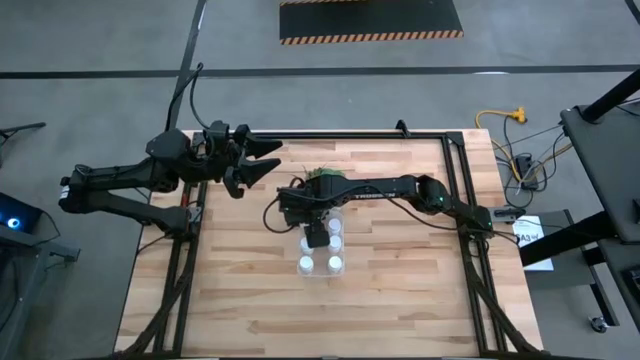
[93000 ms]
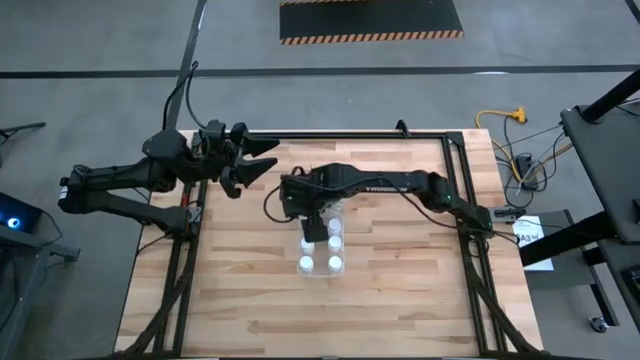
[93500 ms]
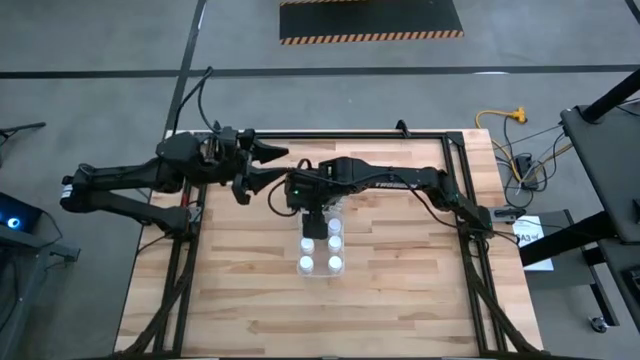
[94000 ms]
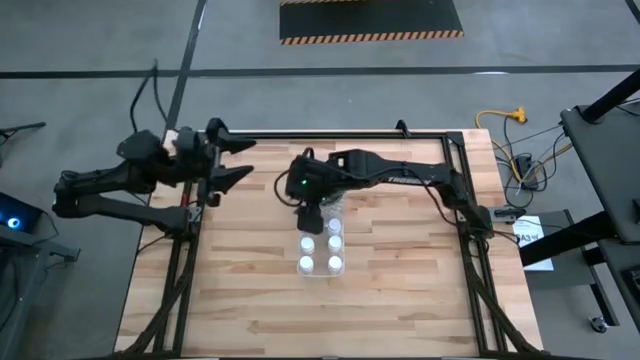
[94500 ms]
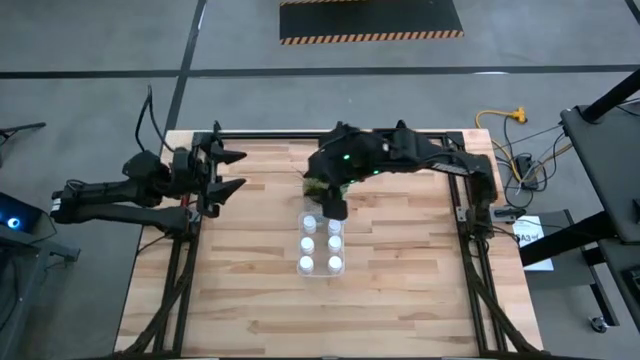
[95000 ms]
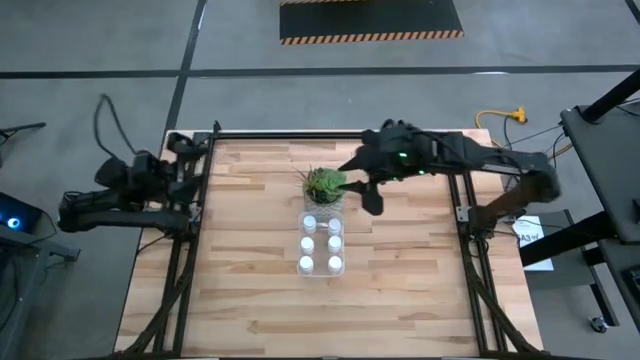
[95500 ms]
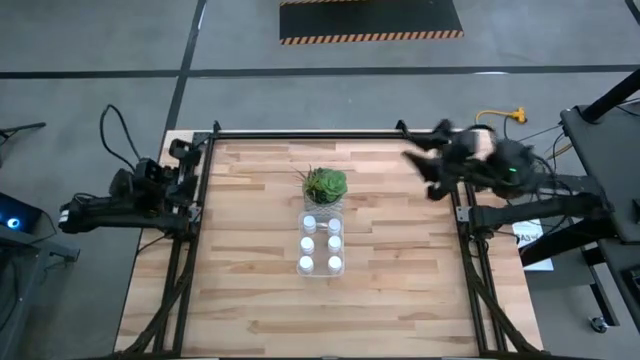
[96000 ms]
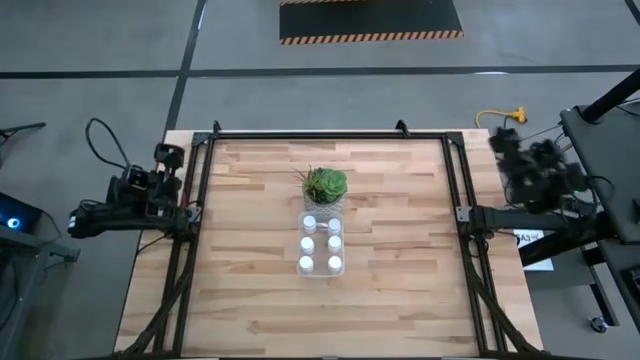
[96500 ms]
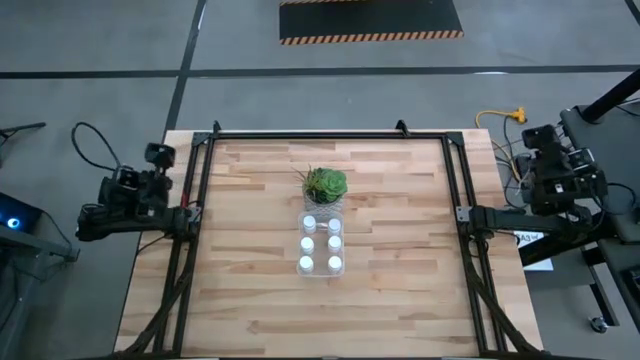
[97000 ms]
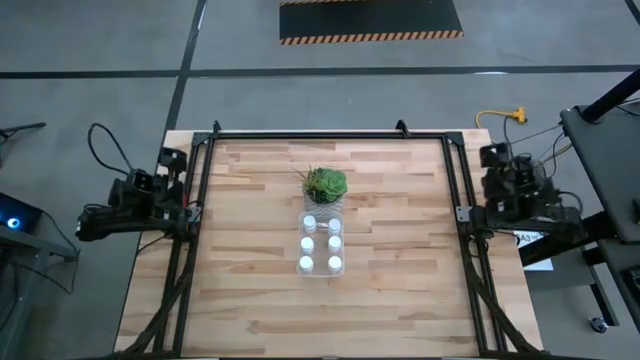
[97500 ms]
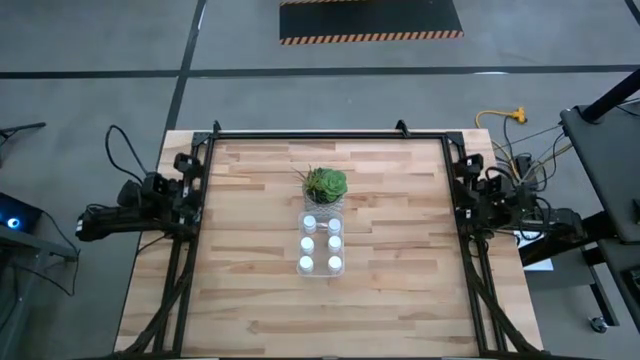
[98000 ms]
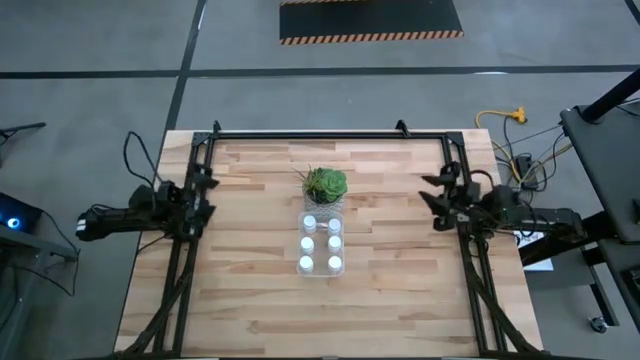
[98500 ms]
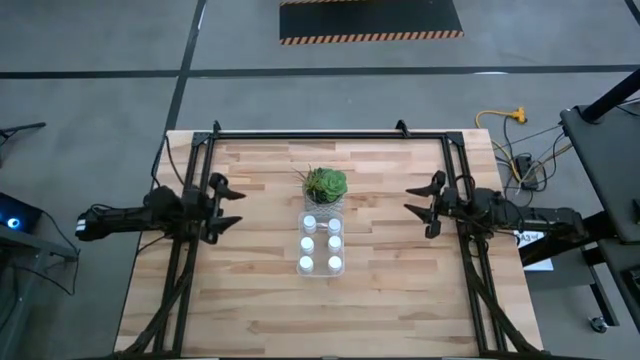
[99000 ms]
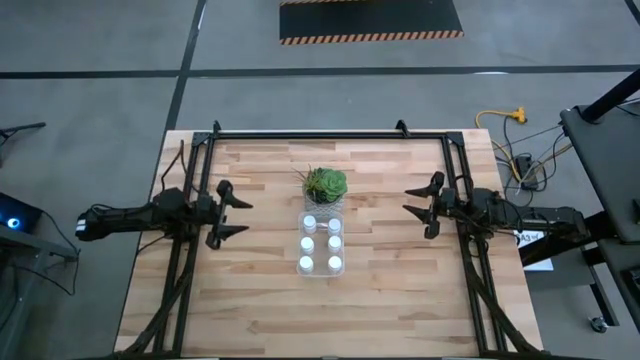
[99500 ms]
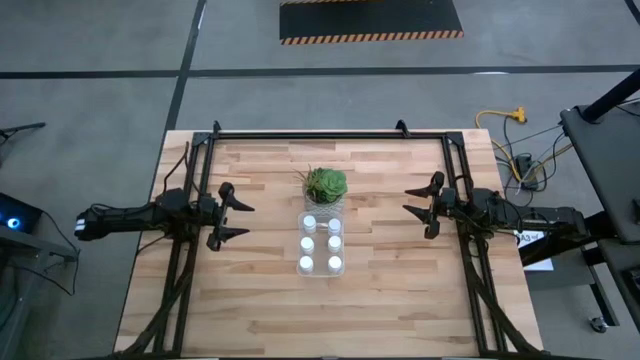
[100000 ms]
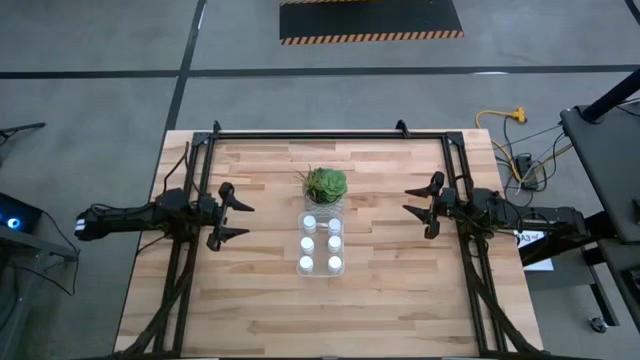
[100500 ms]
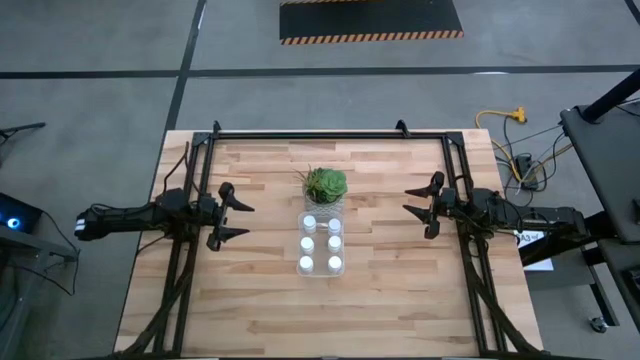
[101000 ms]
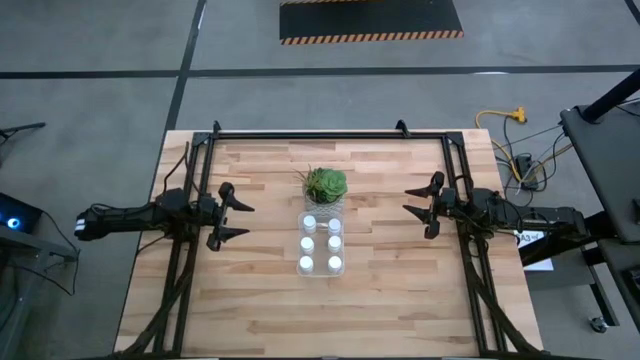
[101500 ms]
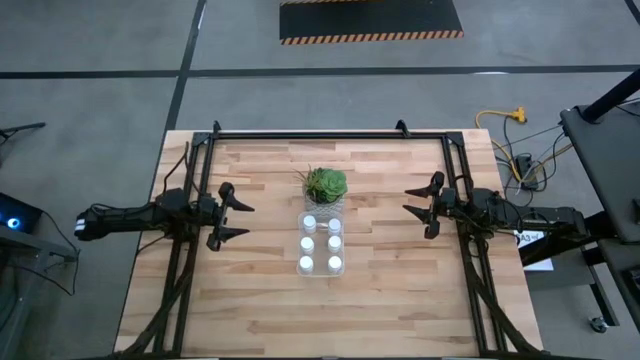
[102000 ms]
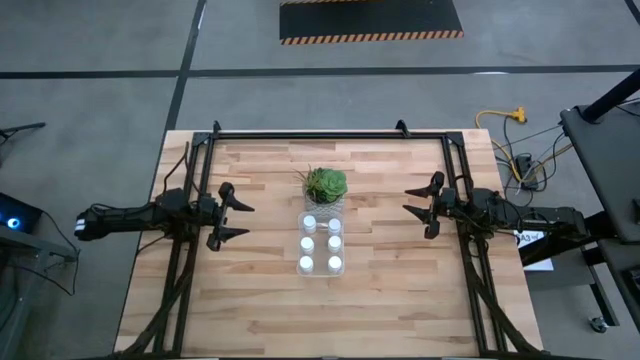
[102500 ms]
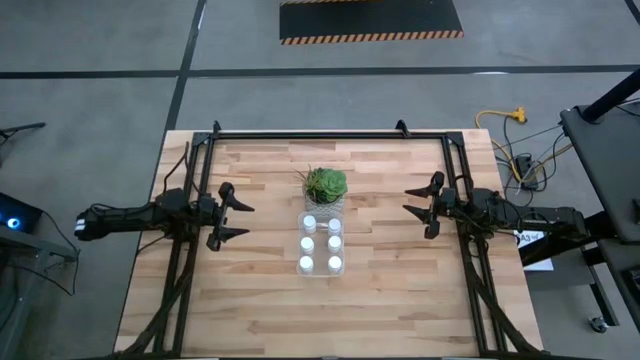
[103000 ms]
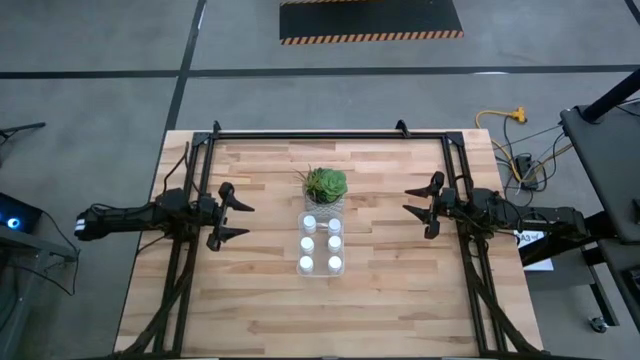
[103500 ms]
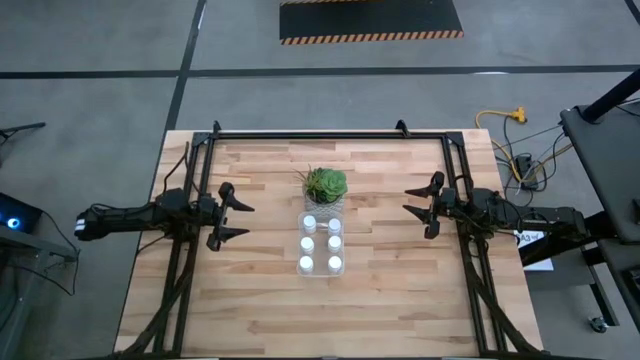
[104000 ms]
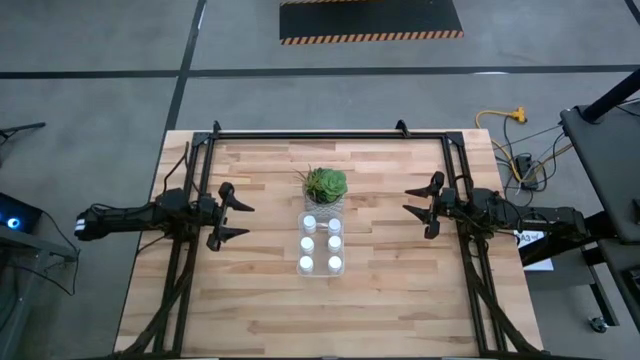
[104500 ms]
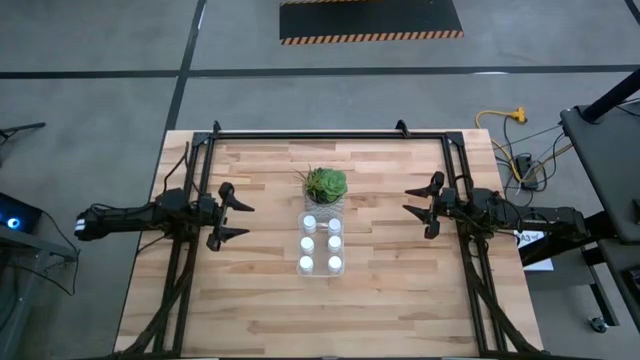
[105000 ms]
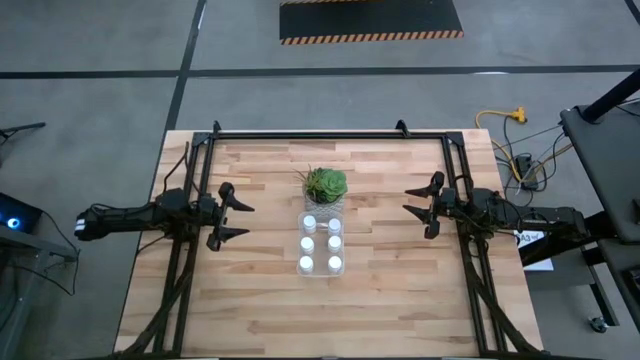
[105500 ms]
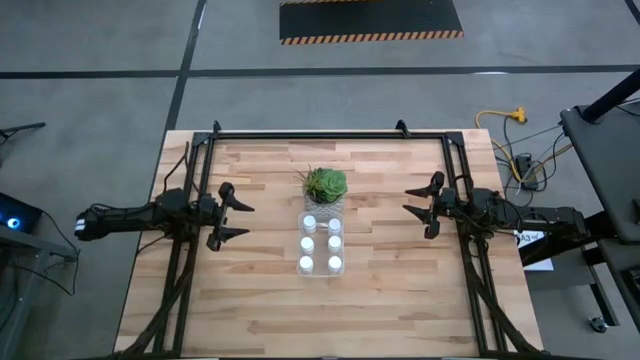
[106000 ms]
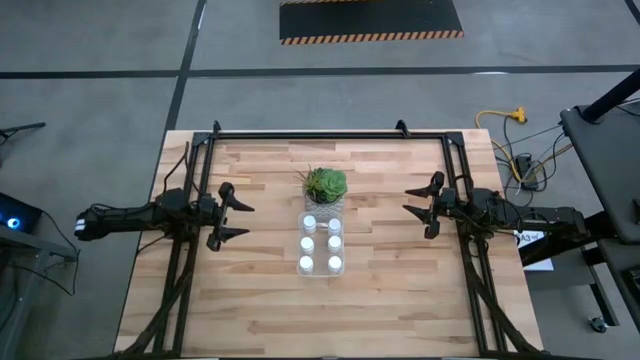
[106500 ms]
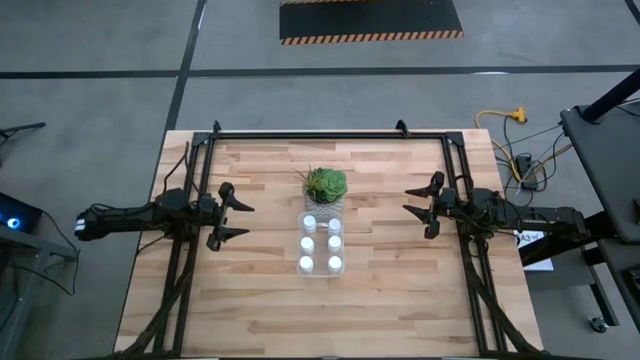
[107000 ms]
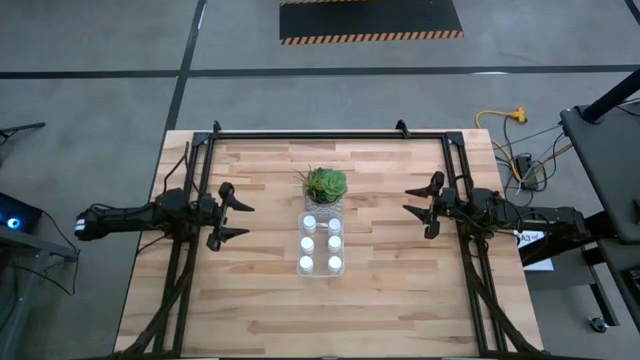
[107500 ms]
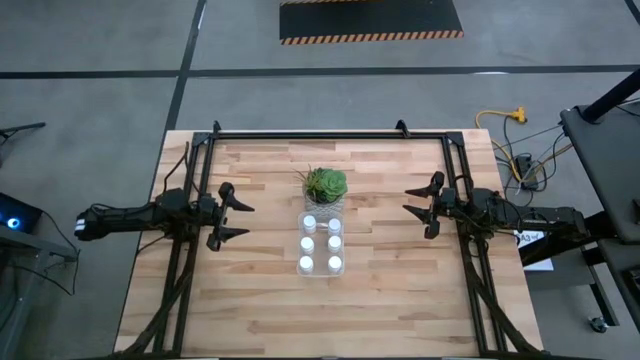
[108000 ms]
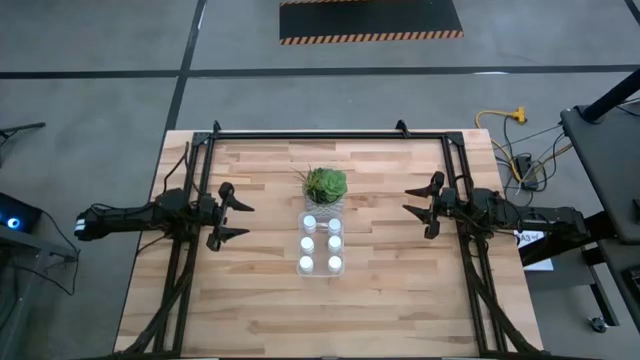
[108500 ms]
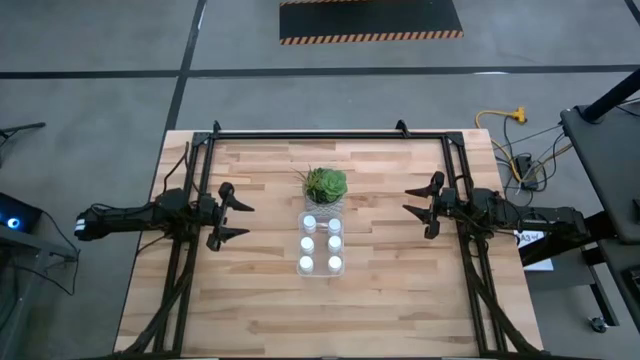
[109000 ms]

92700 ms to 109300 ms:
Task: Pick and place pill bottles into a basket
Return to Home Position

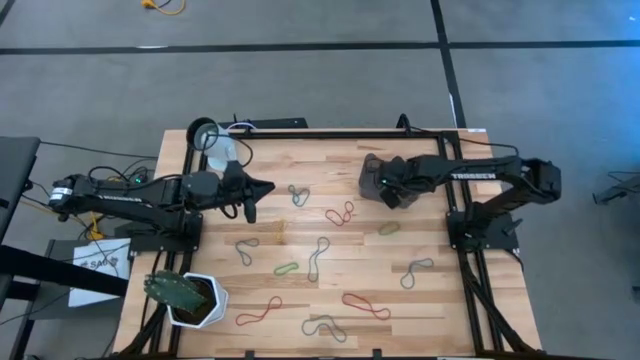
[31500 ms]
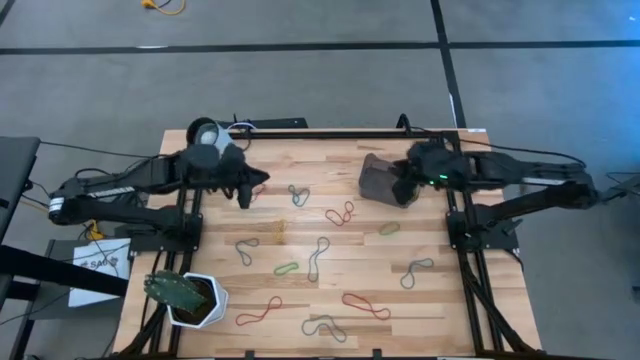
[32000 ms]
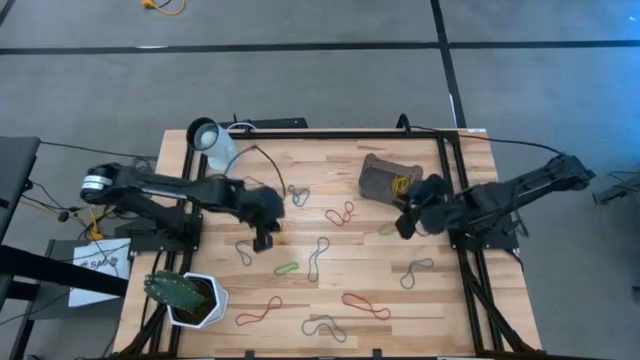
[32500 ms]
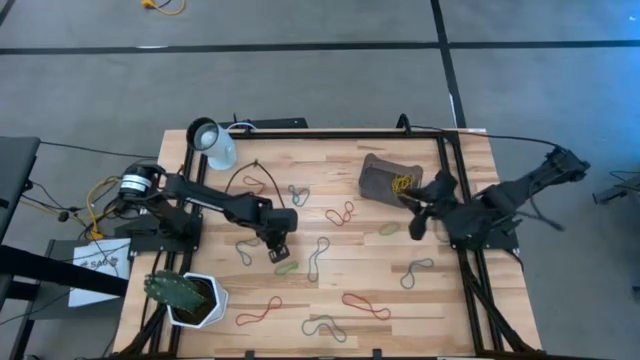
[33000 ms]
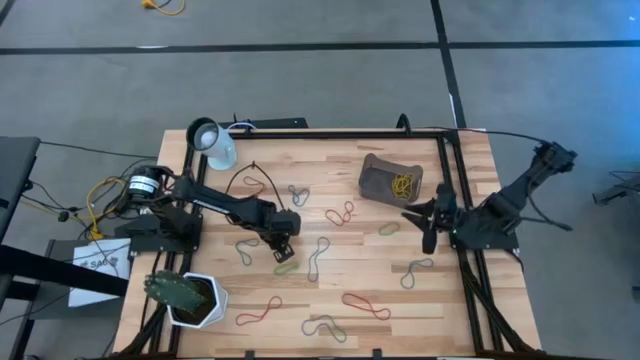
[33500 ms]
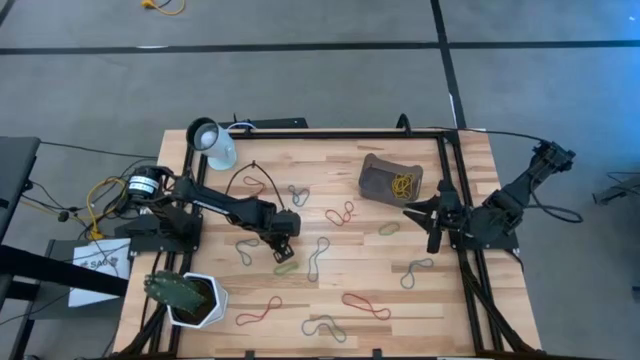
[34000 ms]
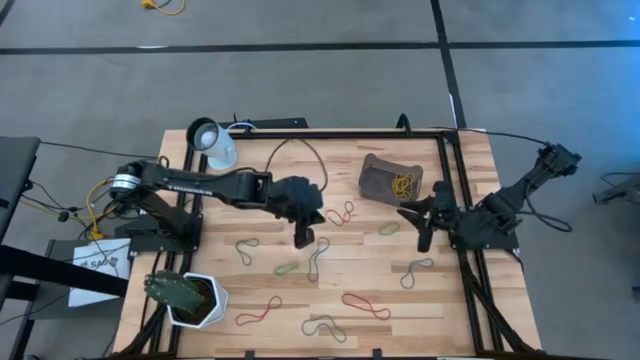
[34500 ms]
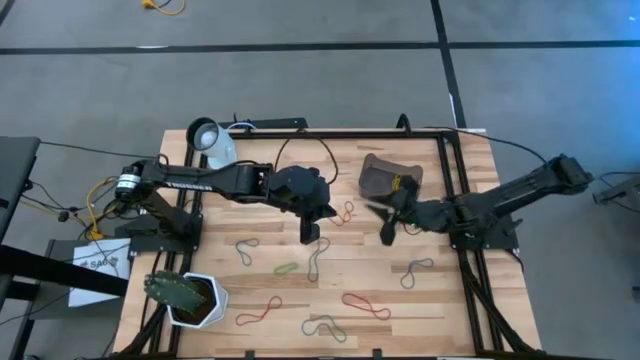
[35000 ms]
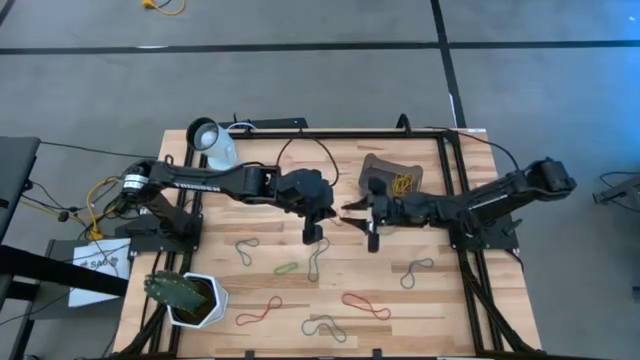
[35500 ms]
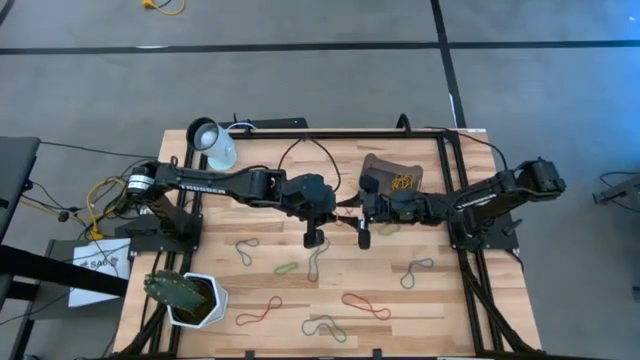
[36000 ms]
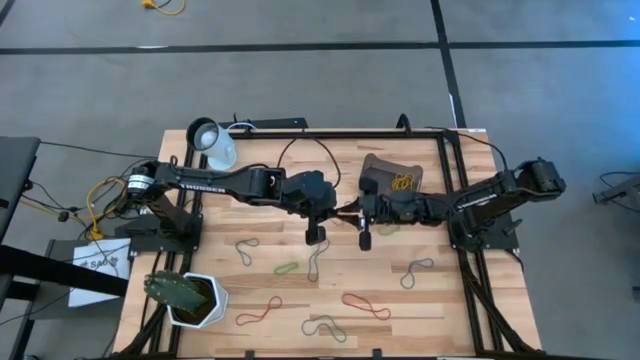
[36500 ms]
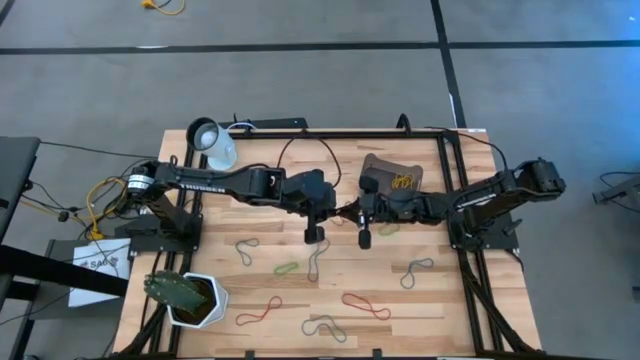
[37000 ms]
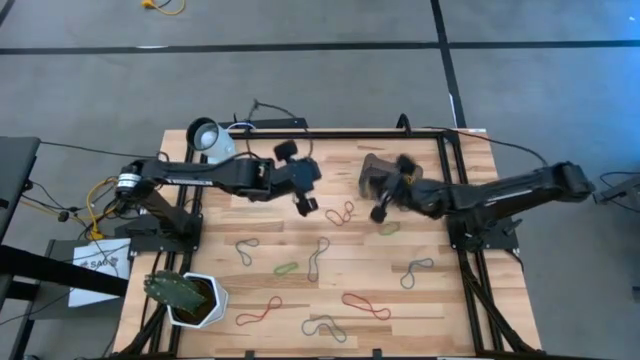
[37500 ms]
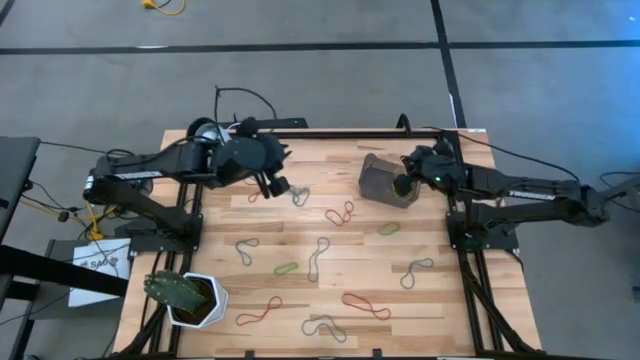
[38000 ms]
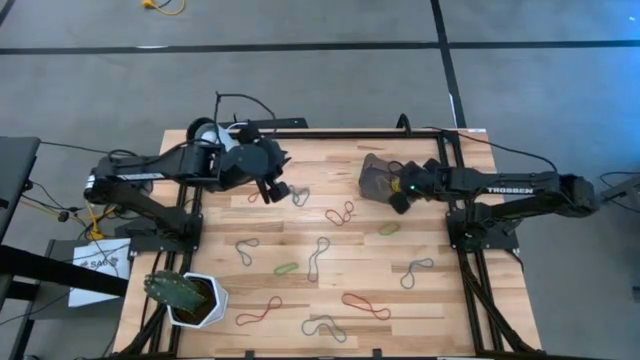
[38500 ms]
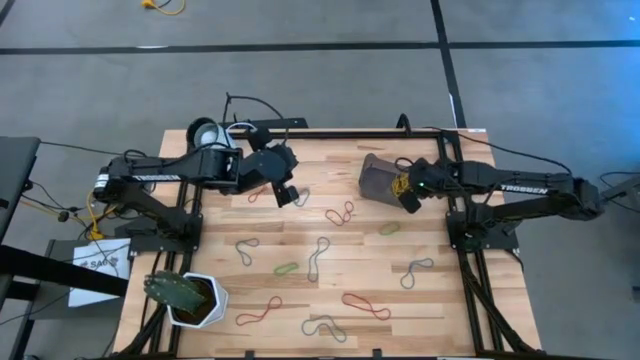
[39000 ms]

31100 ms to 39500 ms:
Task: Pick and place rubber bands into bin
Put the yellow rubber band into the black container
